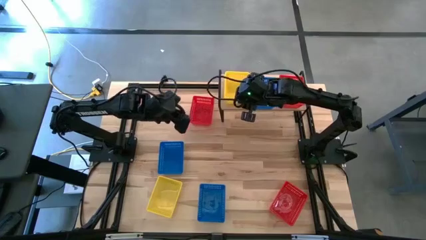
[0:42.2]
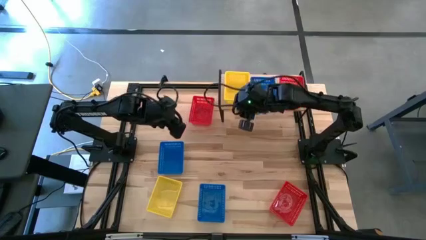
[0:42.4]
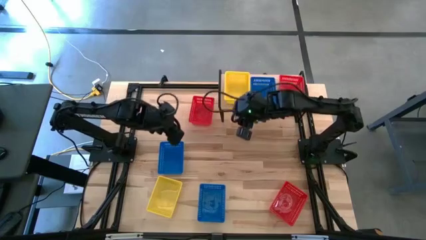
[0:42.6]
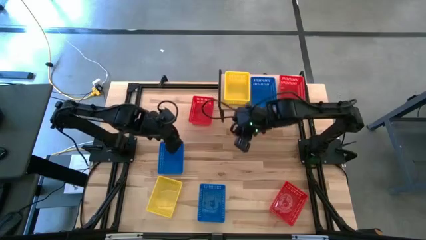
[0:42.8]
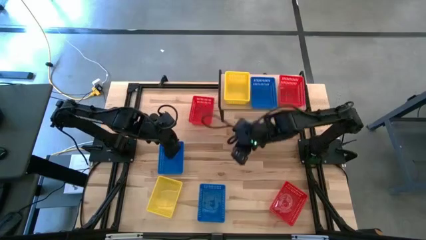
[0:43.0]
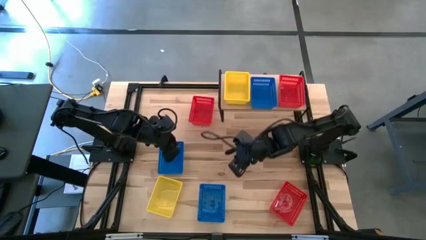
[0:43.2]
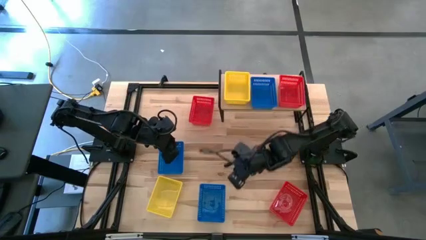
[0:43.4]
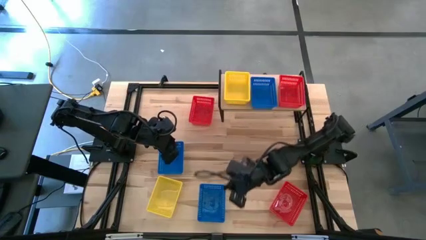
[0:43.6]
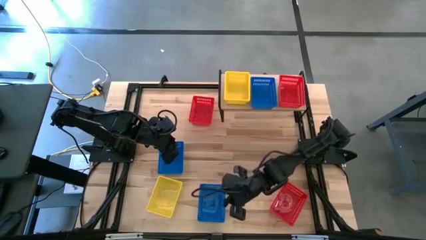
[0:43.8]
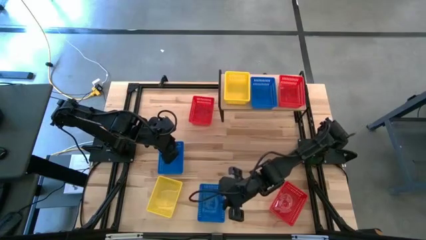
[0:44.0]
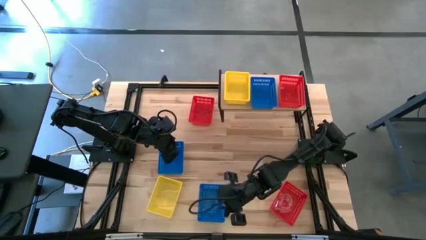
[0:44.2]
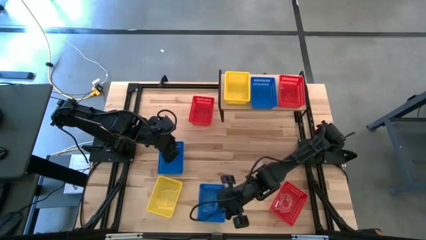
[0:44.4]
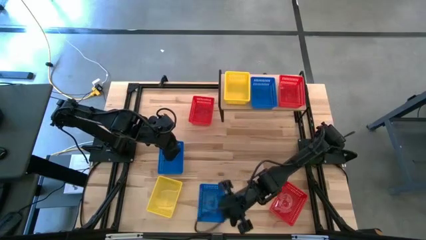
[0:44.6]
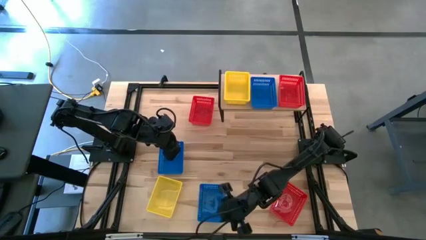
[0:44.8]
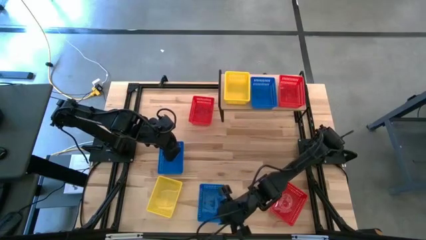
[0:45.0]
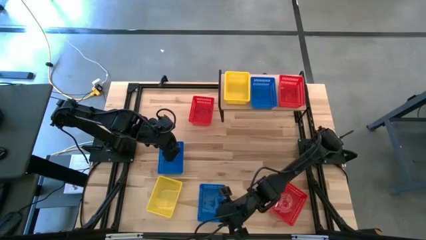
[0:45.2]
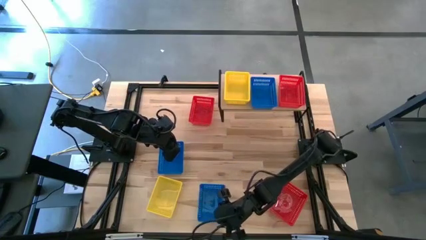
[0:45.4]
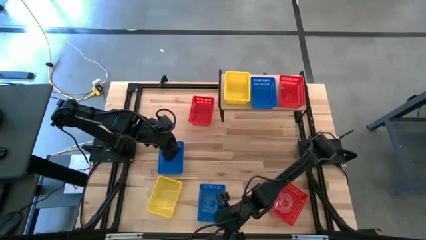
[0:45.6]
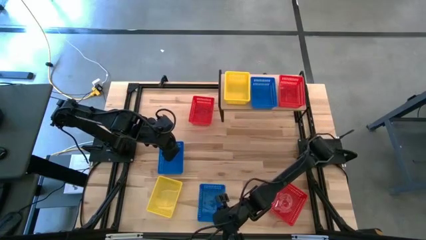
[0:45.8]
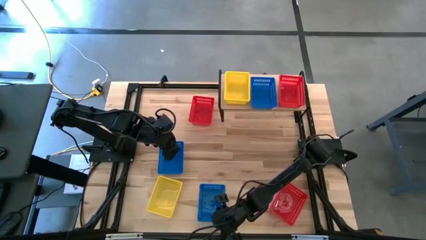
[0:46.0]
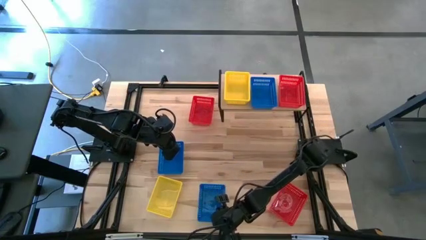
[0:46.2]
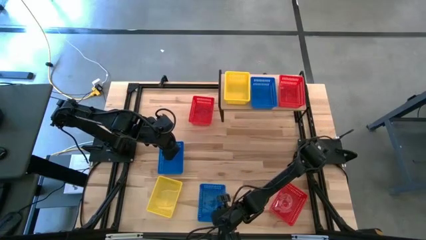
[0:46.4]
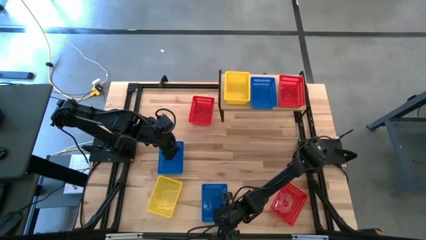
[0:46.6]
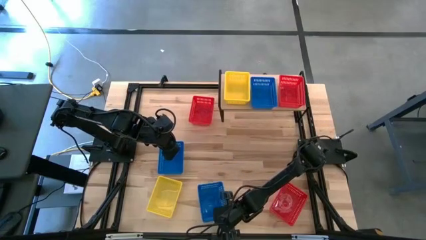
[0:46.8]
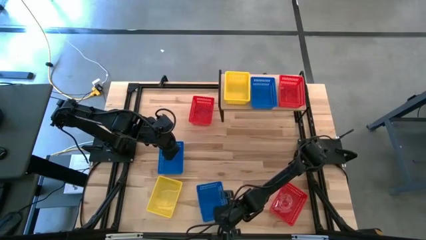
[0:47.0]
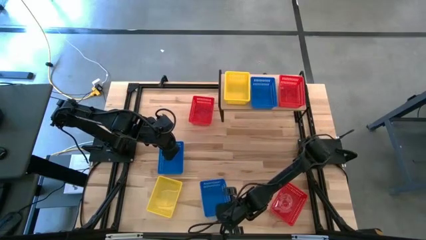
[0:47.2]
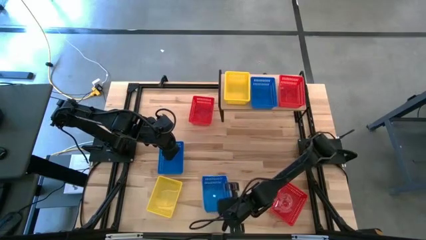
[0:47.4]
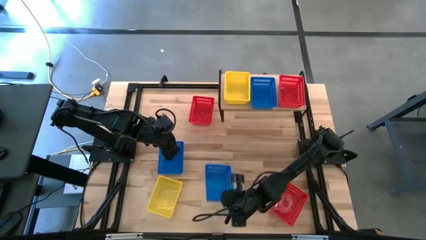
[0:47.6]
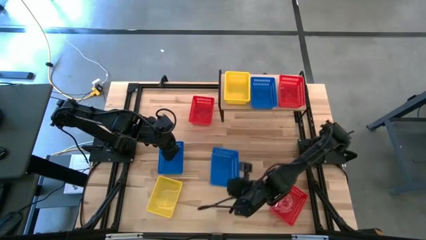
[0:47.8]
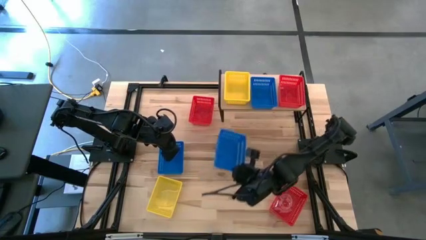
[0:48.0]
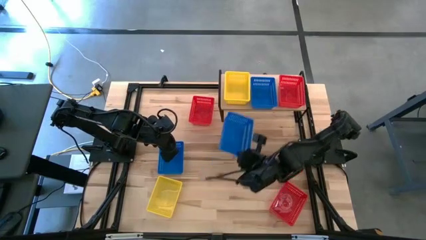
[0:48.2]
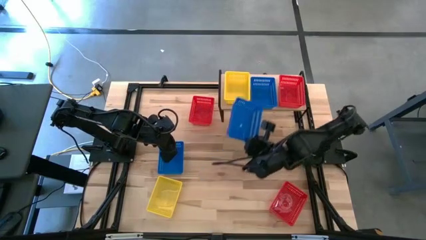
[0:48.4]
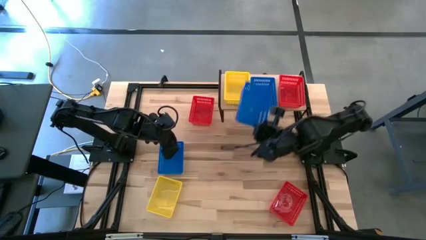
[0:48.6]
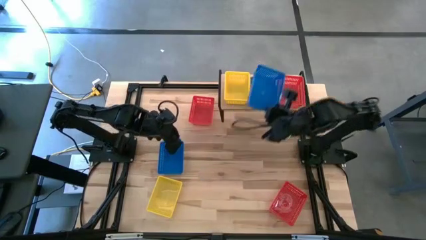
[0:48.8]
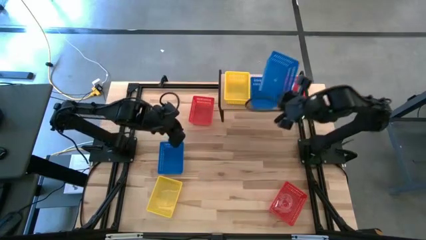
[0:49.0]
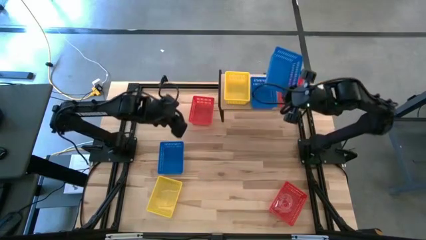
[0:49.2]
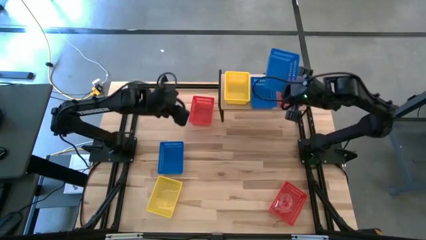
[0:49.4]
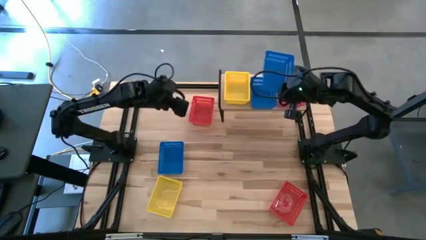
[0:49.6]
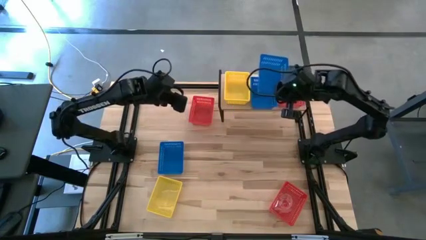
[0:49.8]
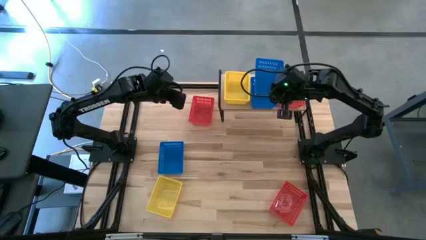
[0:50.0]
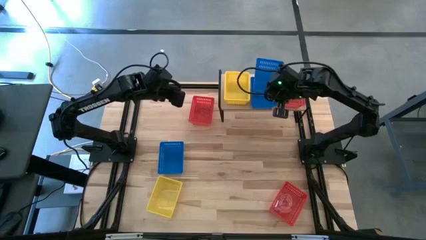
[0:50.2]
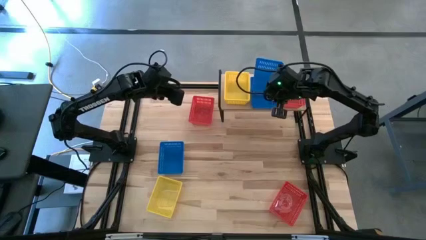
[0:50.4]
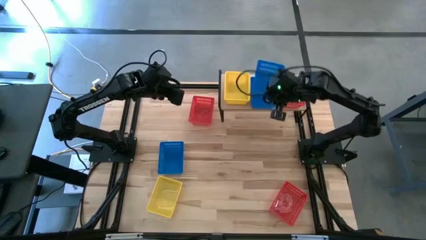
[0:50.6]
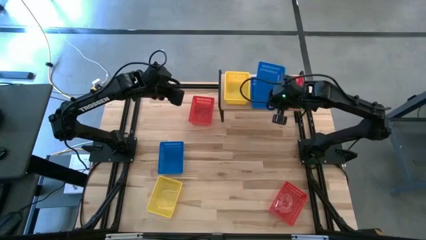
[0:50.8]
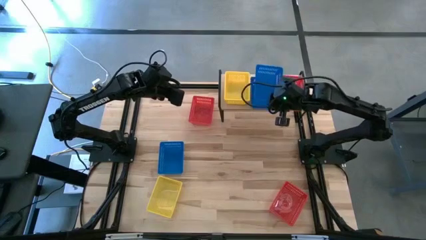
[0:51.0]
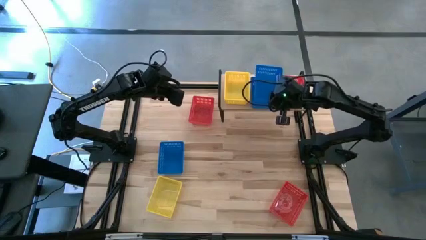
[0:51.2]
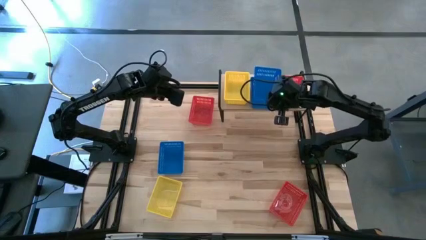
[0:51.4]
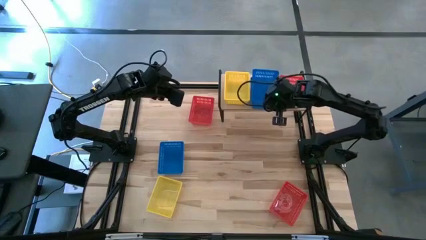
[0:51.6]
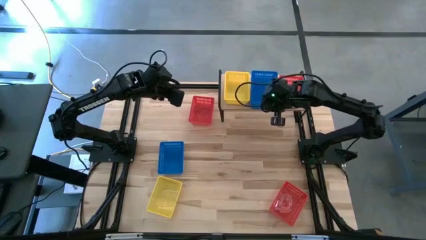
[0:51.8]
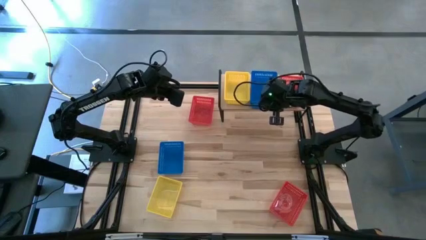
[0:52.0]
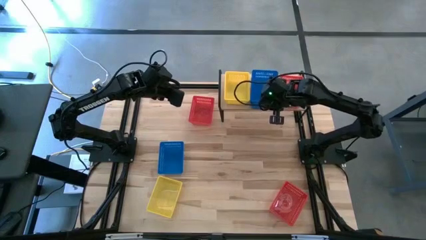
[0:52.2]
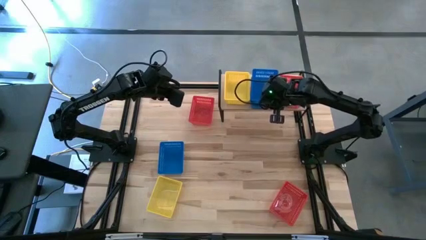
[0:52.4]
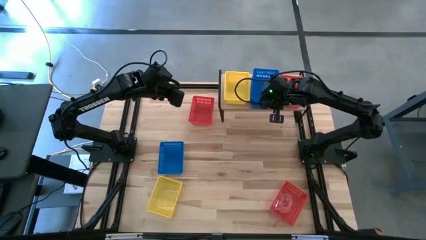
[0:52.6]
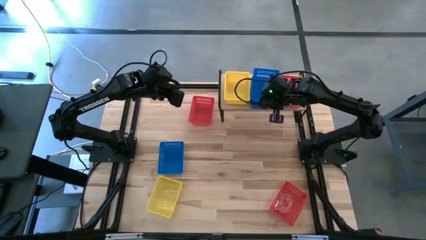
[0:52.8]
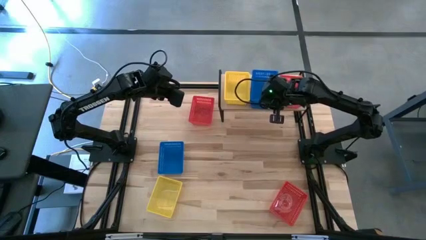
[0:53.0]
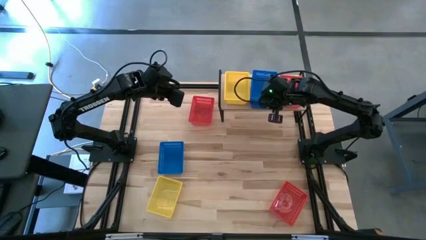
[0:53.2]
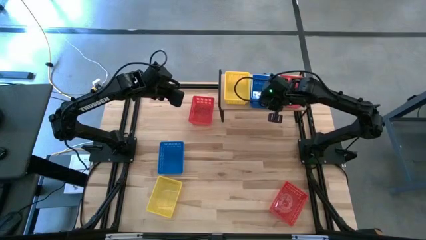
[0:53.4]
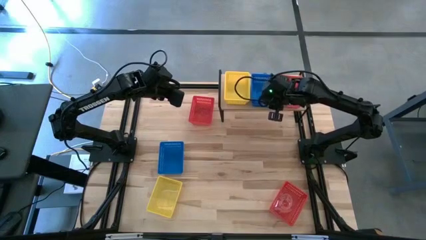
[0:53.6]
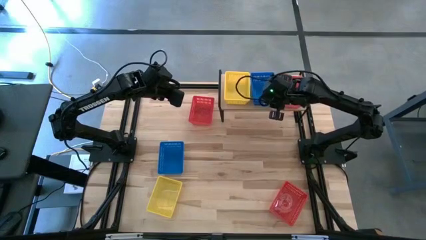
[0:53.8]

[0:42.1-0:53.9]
Task: Stack baskets on shelf by color
Stack the bottom blue bin on top of the other blue bin on the shelf
